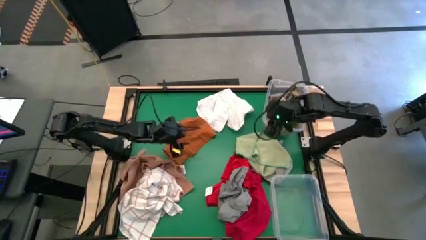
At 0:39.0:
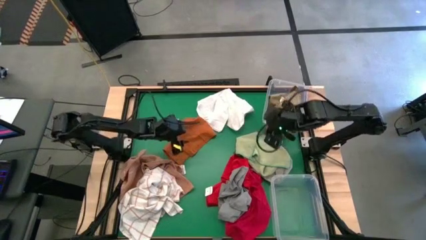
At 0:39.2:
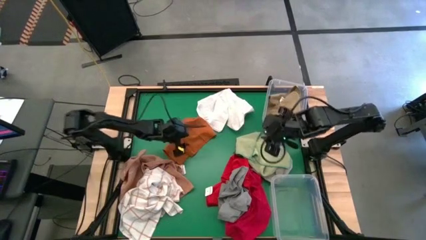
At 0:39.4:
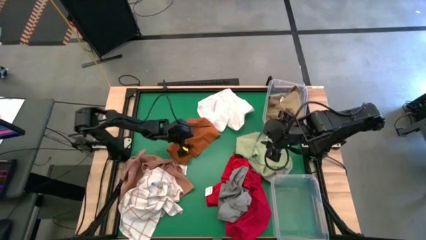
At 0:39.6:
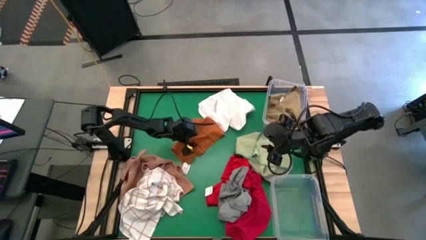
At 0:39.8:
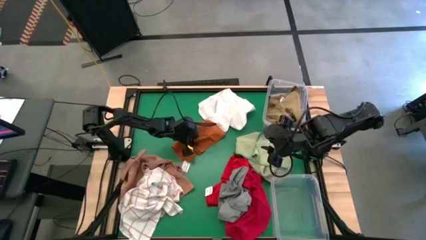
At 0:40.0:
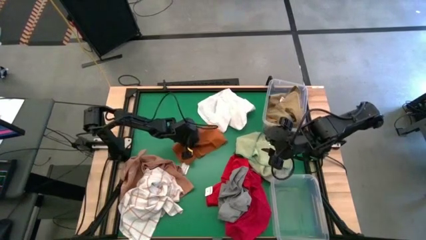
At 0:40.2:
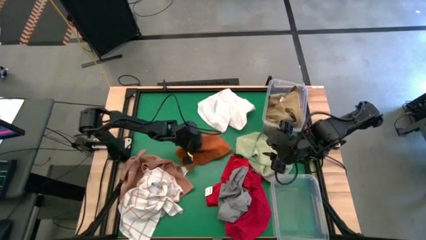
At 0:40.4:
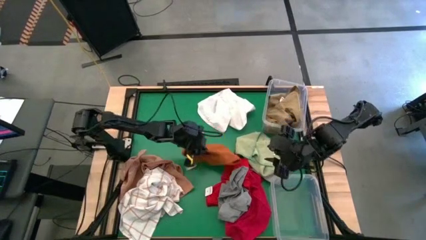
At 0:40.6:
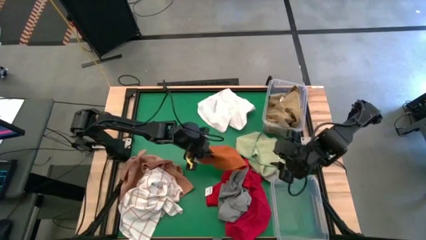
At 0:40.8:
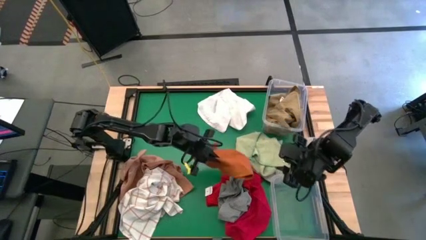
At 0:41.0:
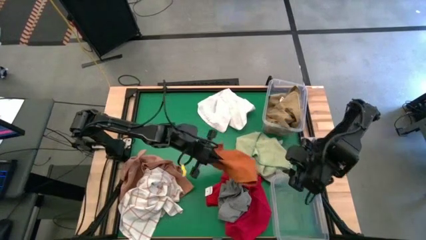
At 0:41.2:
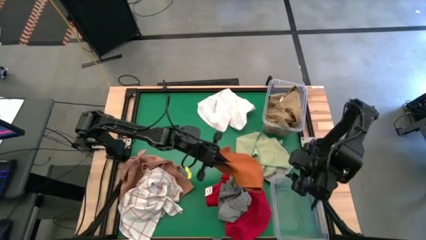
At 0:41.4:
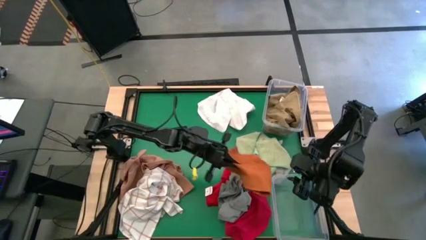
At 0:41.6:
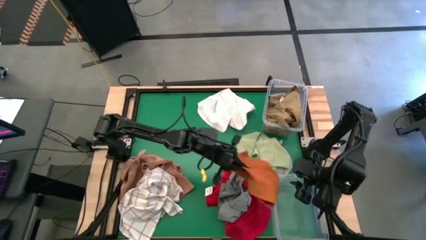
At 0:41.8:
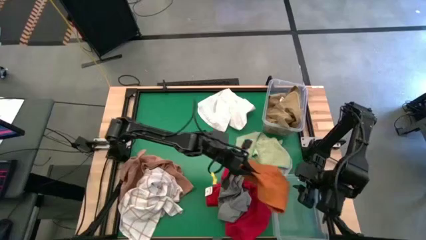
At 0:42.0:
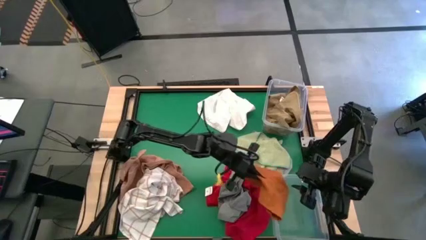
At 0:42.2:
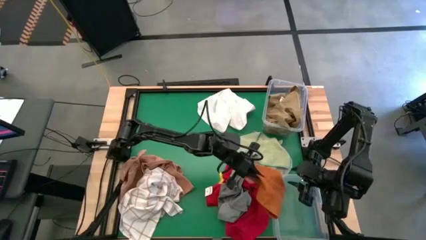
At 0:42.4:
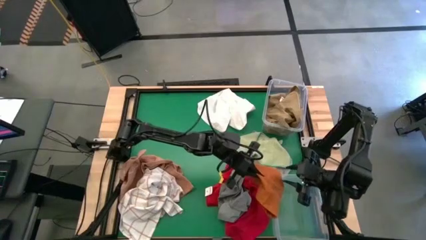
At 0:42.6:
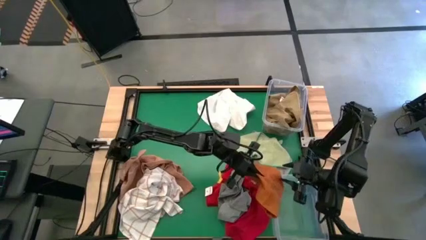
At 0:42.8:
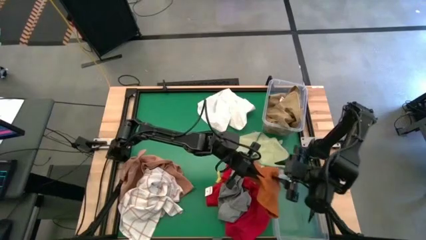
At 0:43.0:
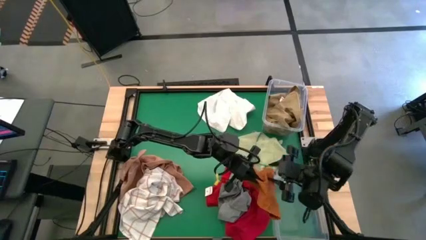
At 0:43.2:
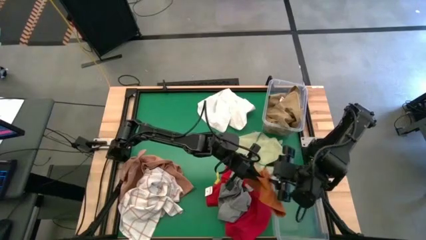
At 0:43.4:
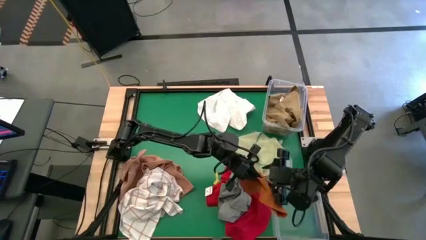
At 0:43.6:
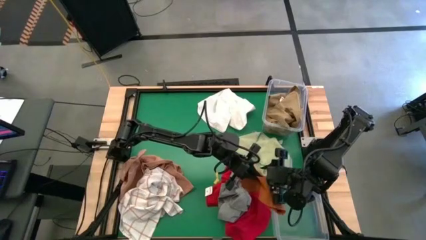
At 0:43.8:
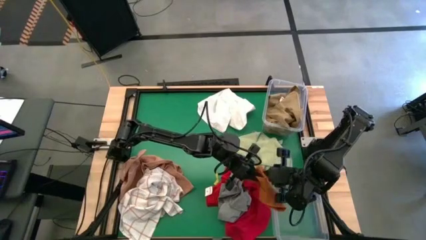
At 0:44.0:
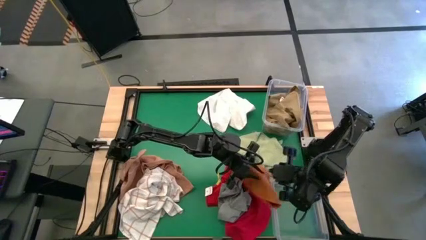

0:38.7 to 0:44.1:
Task: Sort towels by color in basket
Put the orange towel into the bottom transparent bin

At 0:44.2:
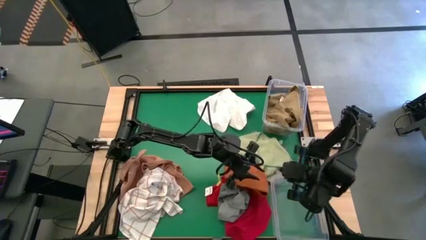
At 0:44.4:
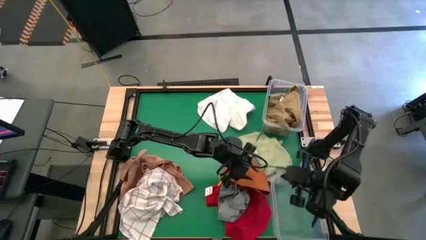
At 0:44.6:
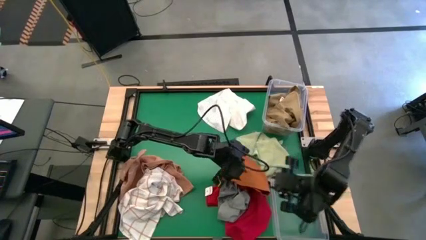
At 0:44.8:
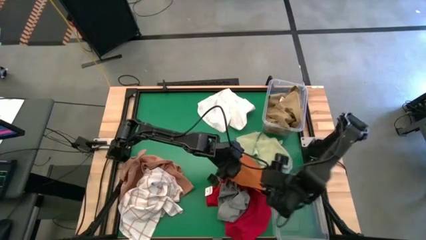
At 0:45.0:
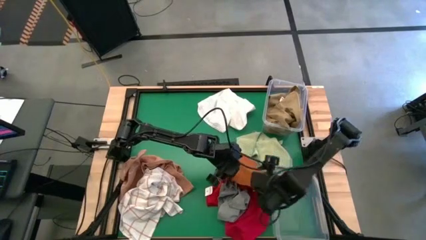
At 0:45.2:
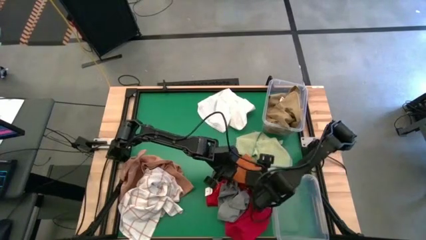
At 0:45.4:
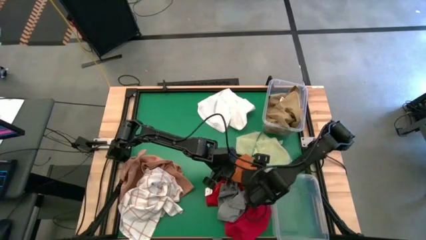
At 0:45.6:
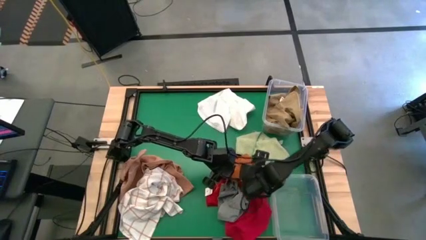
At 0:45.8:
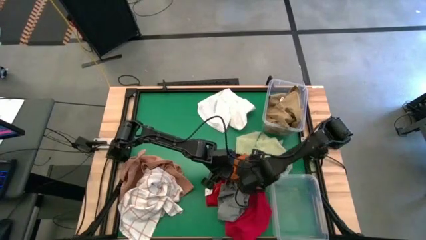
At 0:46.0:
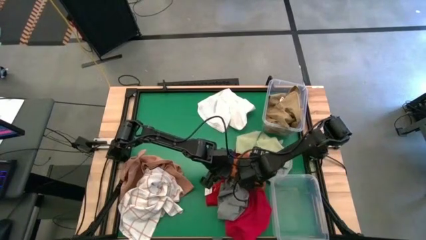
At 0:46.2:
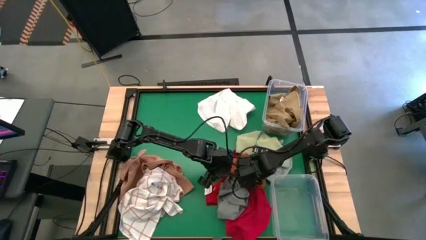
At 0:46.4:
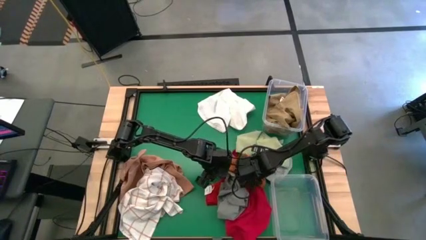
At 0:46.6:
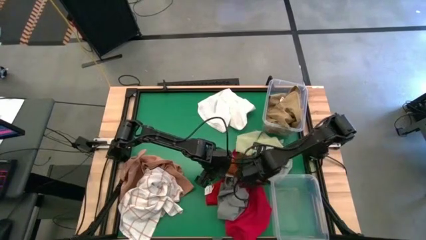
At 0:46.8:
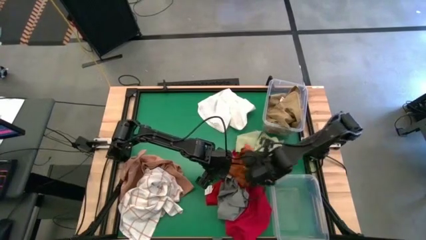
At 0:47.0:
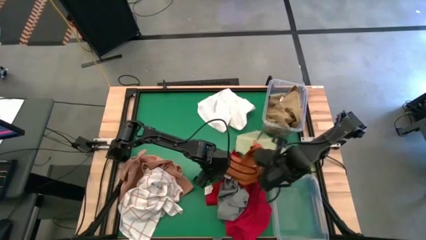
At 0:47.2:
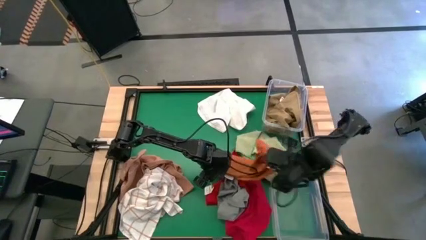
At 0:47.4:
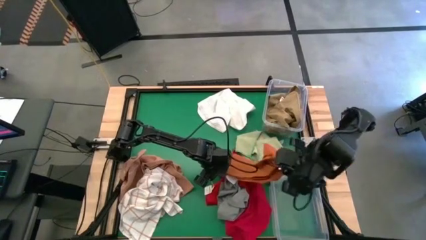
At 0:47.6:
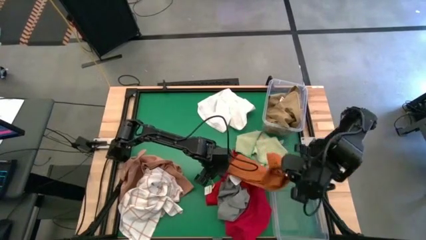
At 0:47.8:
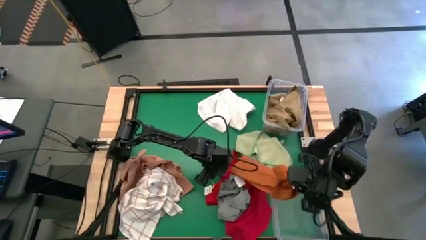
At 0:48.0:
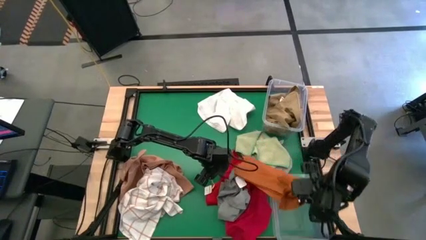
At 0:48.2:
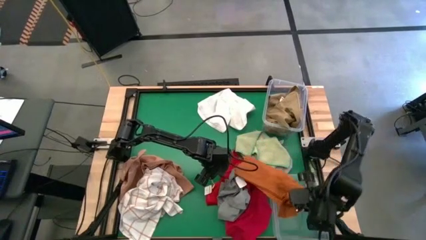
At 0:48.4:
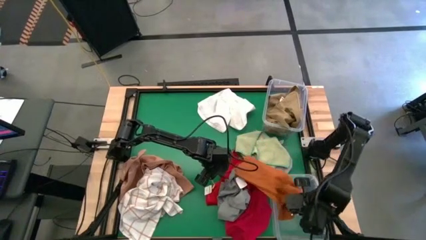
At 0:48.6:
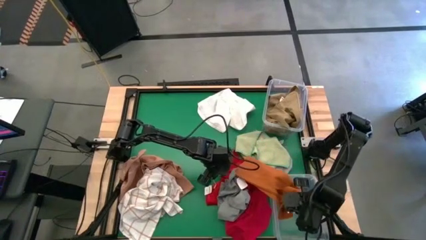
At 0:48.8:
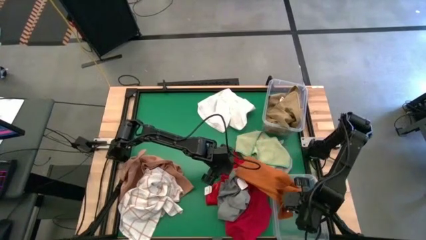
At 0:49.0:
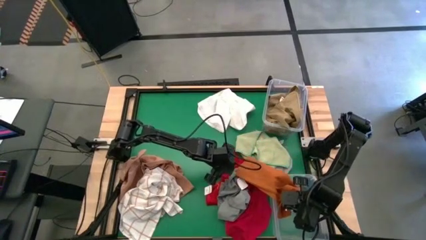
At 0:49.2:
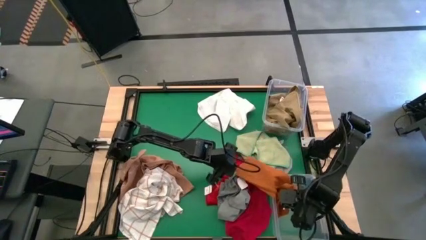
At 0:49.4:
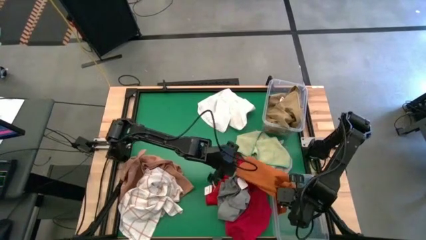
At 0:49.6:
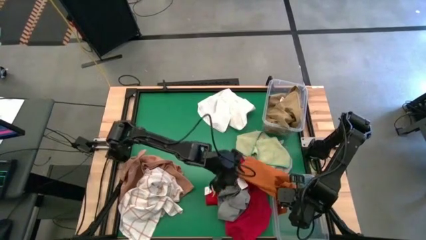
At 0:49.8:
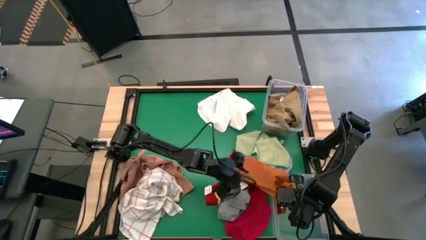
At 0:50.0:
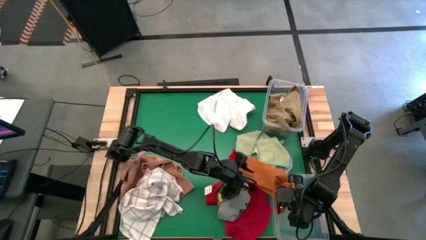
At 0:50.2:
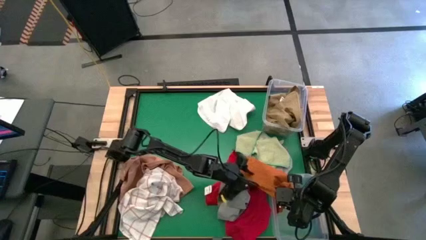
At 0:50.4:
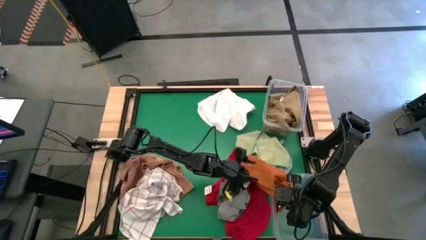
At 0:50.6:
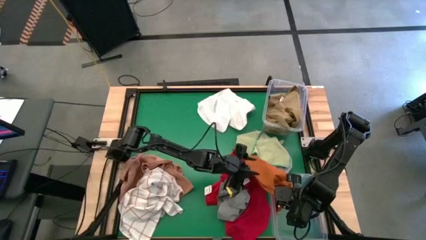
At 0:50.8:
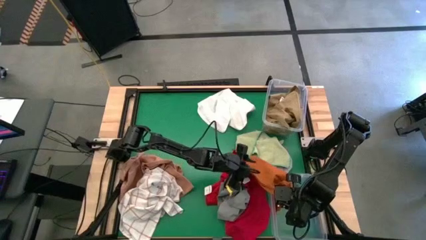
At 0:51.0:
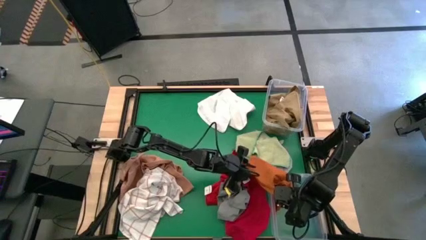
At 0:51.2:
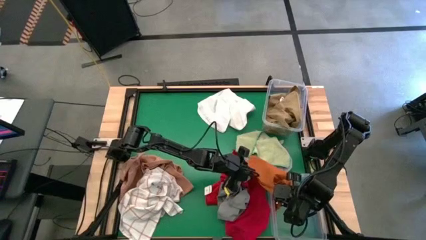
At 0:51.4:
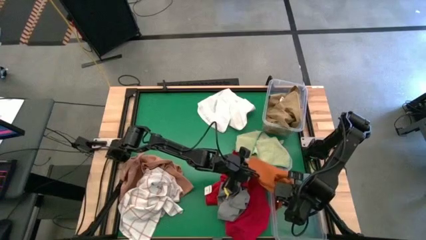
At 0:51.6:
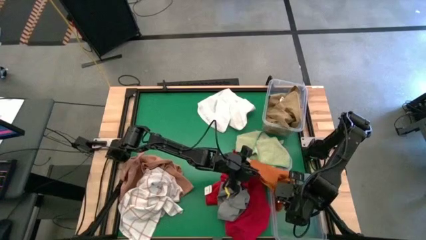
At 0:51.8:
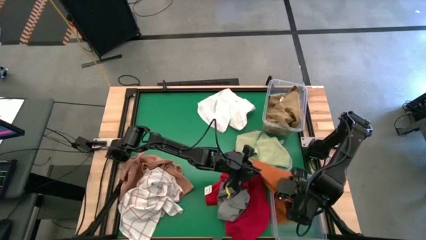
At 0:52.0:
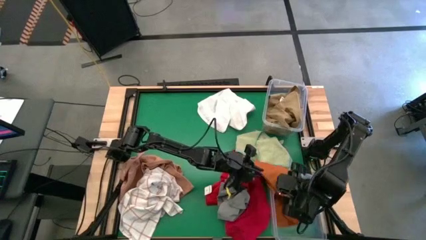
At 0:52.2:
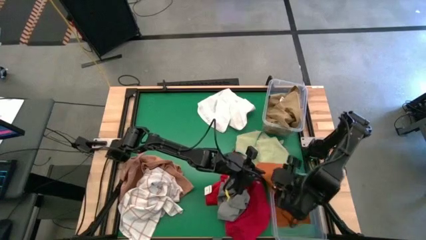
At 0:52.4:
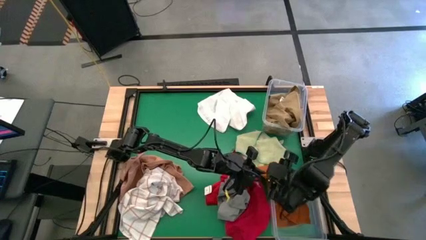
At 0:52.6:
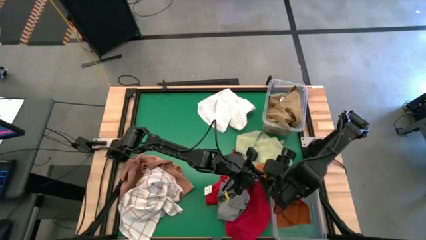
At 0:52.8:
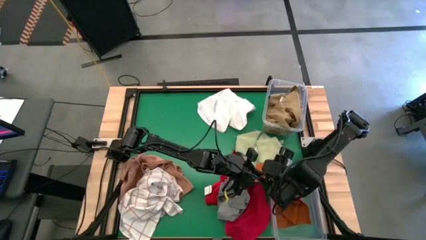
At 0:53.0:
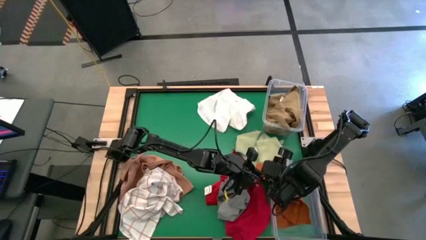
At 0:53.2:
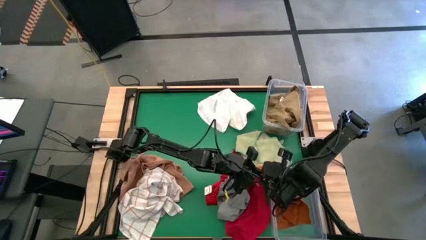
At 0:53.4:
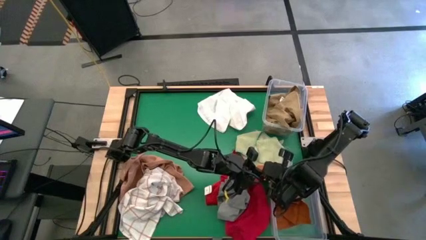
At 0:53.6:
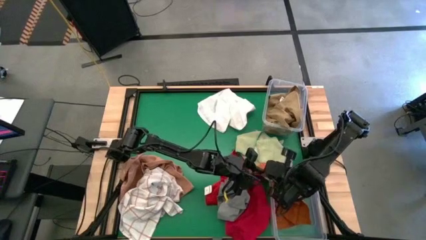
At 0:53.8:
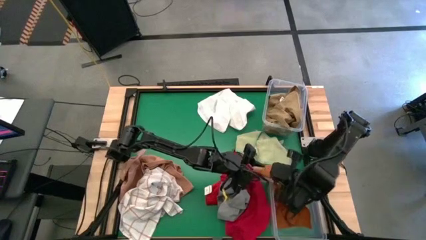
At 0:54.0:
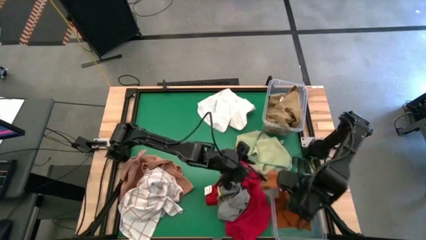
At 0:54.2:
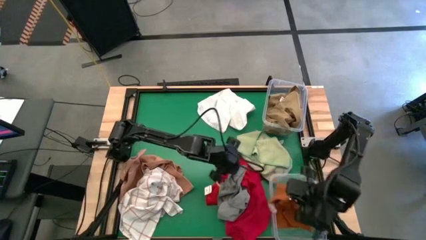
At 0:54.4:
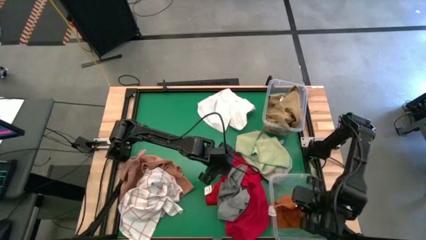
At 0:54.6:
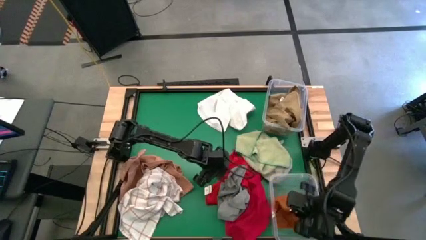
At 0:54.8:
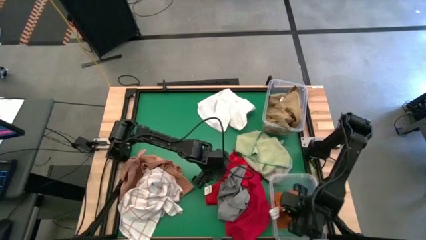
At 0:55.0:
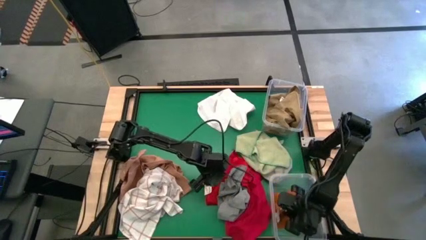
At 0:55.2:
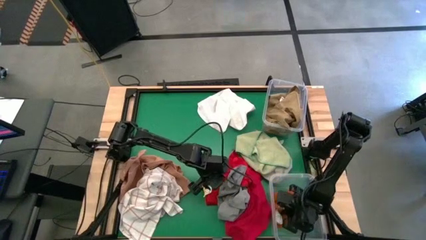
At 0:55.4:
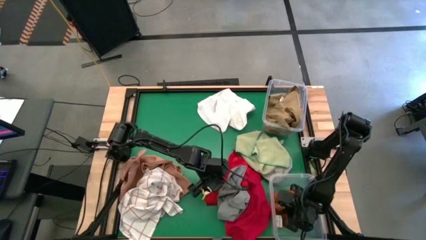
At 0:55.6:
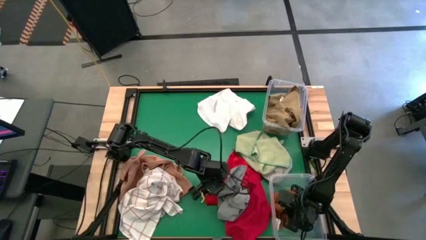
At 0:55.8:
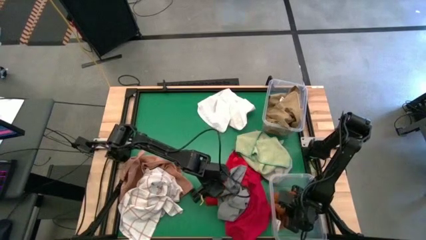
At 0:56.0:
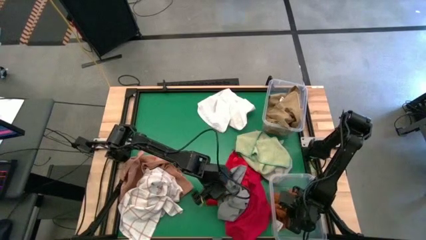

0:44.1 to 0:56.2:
Put the orange towel into the bottom transparent bin
